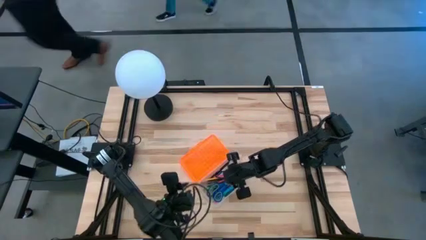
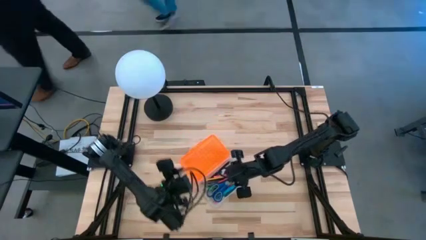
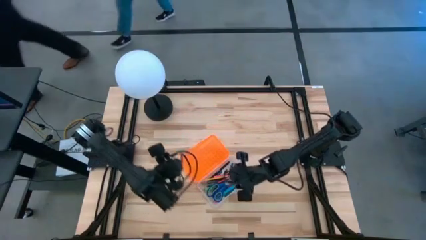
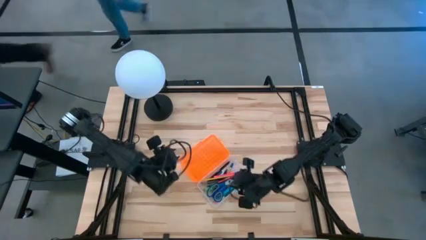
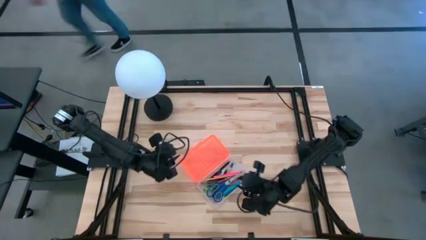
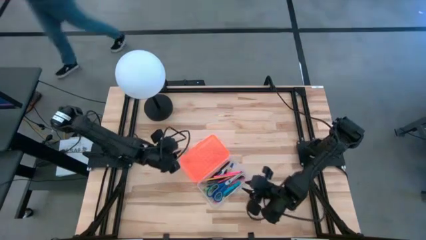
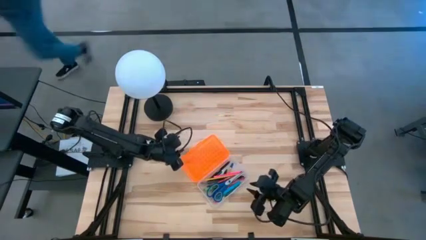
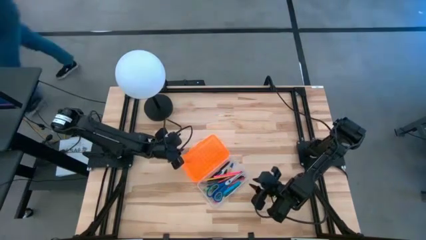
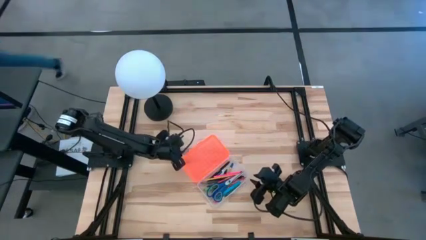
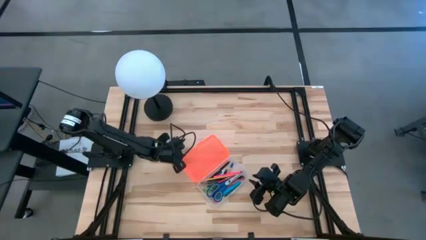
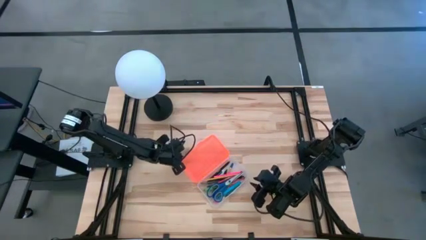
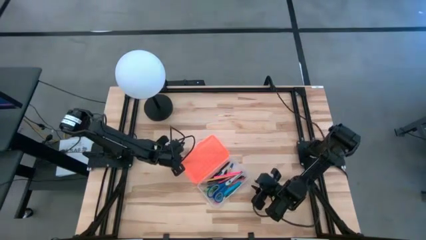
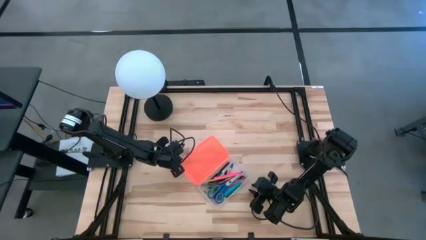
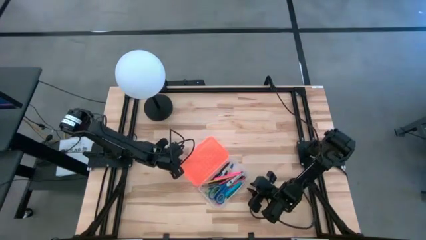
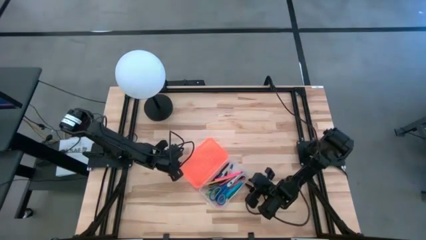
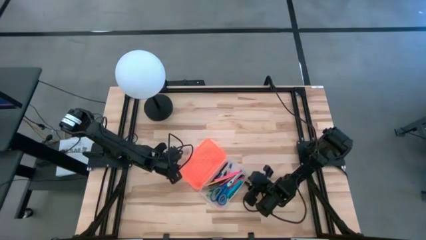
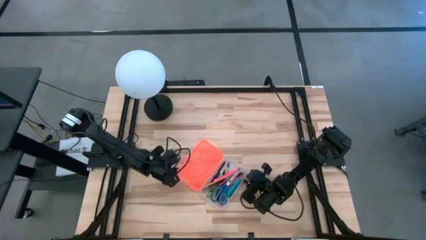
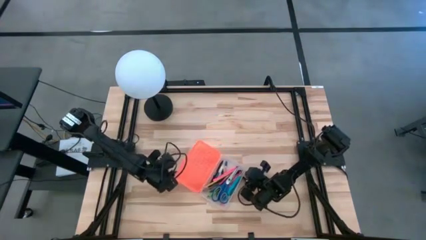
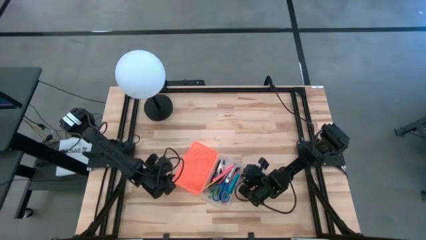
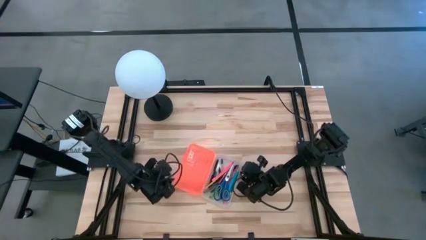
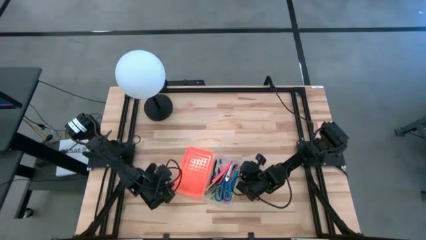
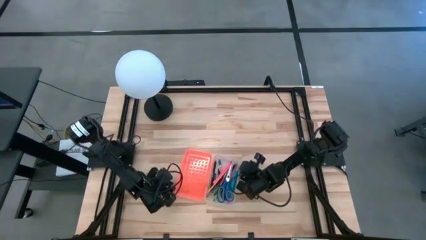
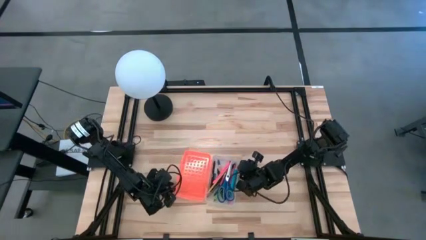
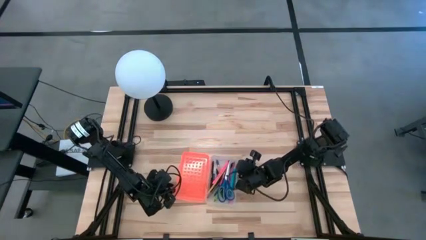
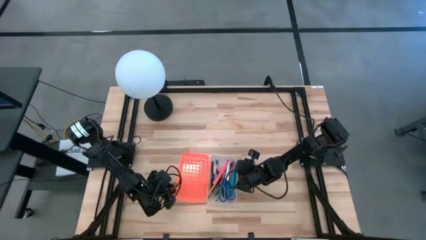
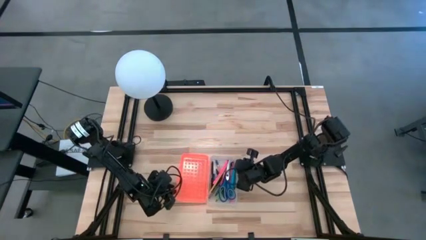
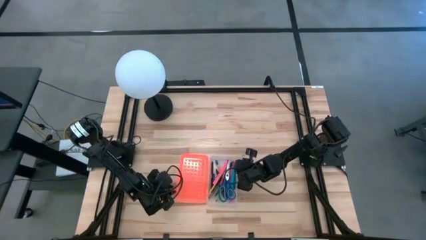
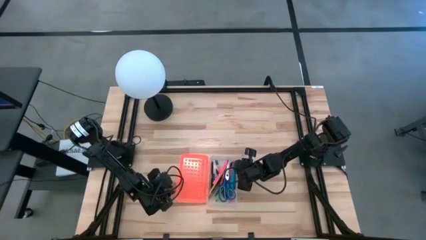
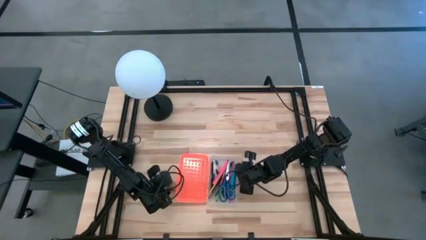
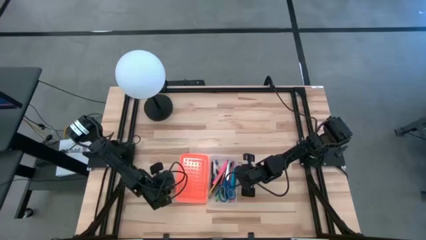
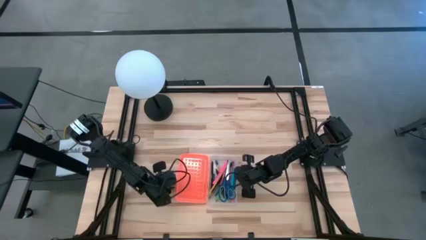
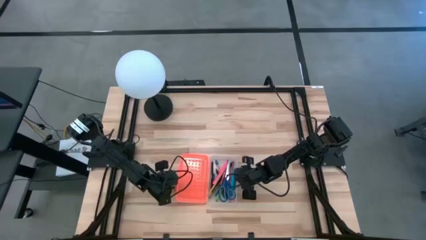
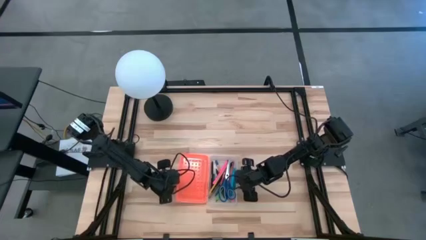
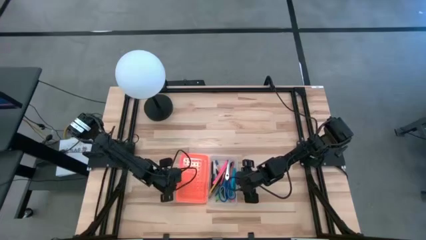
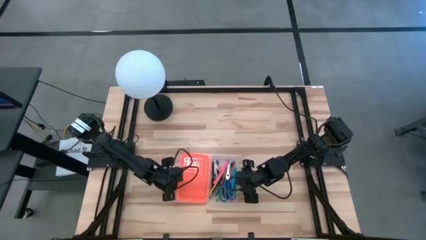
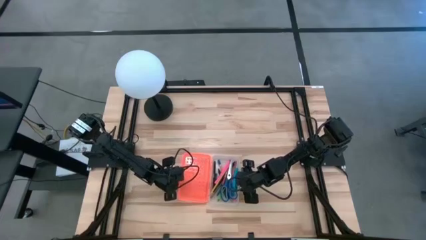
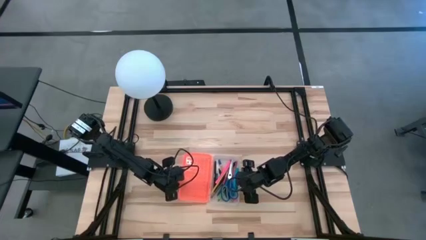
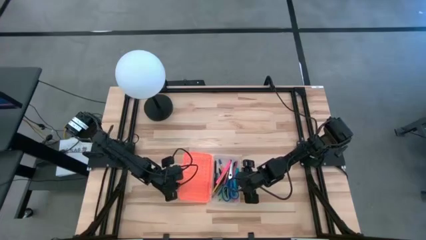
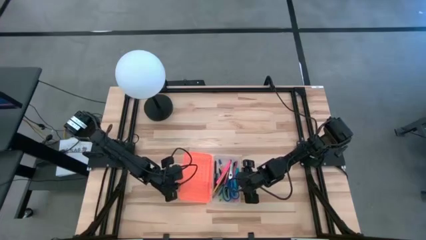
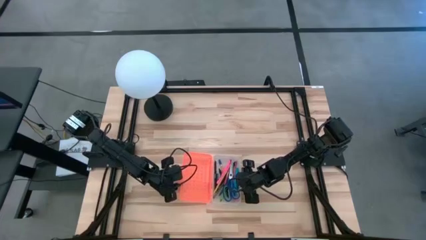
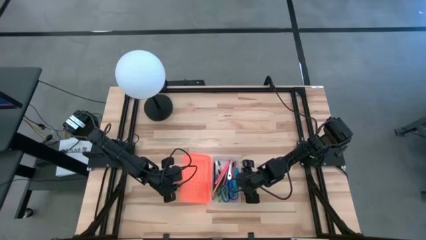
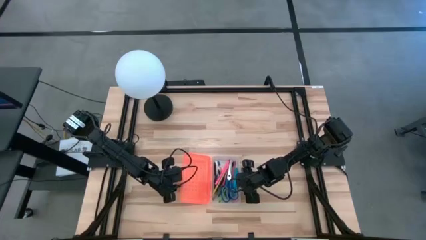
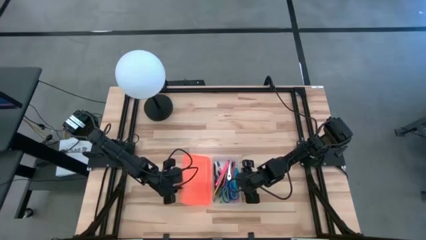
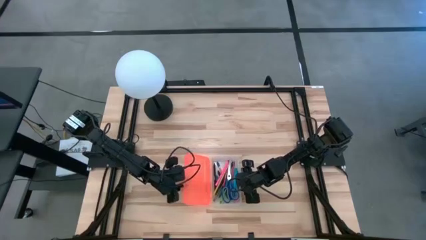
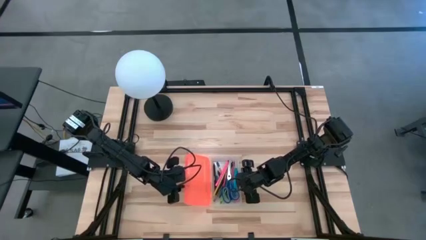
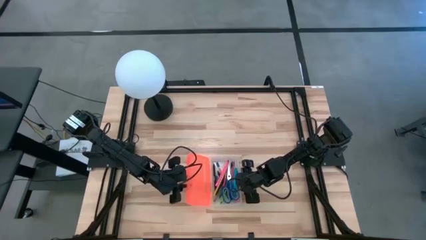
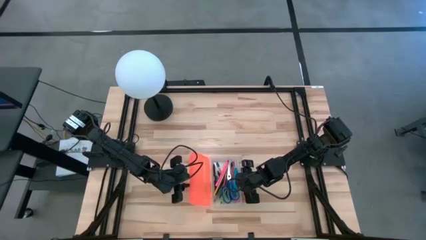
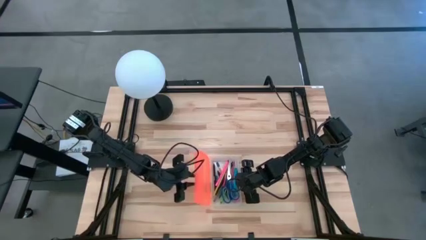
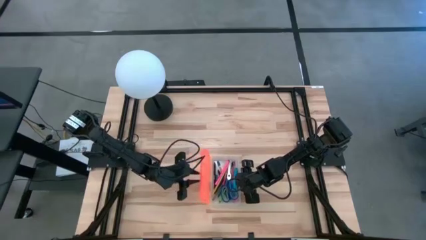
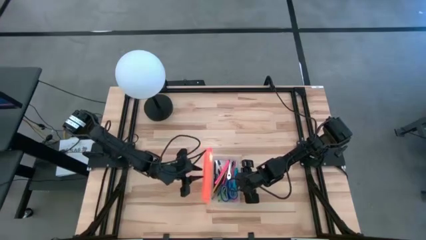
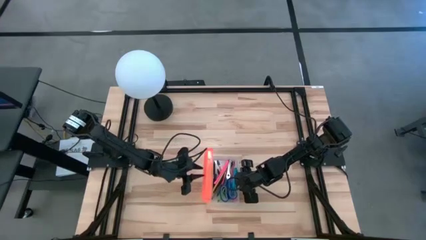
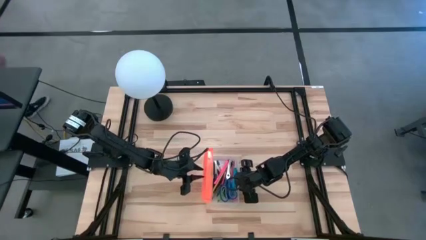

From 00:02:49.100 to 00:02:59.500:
Task: Pick & place school supplies into a supply box
Close the supply box cover
